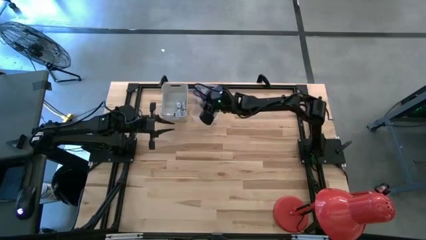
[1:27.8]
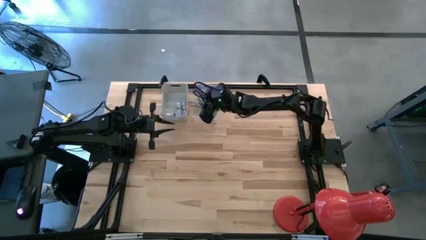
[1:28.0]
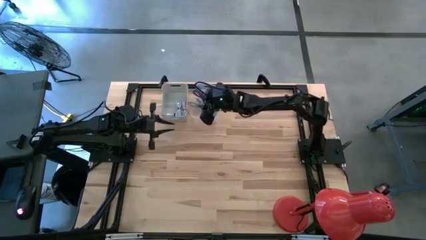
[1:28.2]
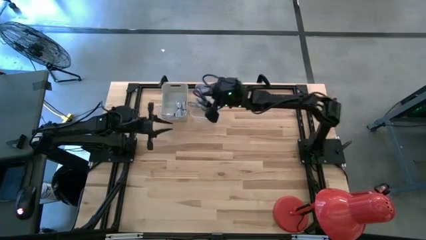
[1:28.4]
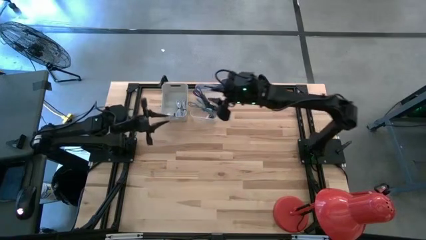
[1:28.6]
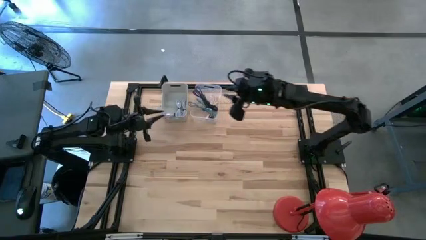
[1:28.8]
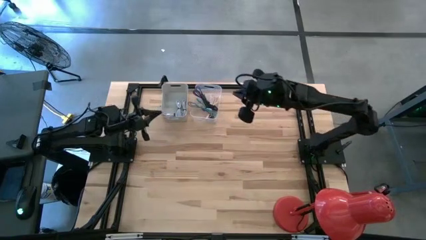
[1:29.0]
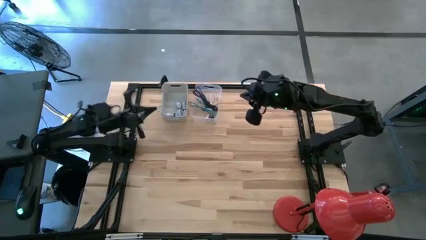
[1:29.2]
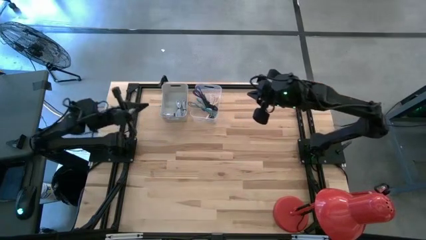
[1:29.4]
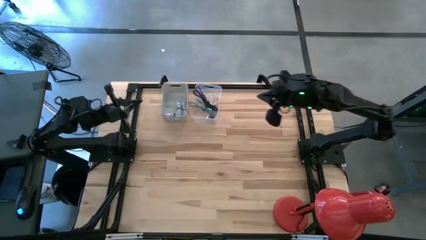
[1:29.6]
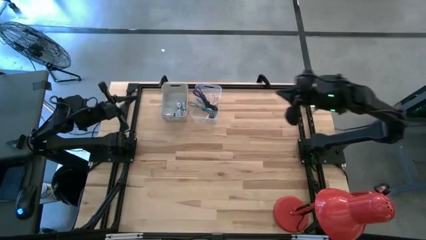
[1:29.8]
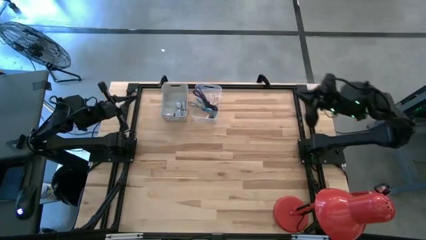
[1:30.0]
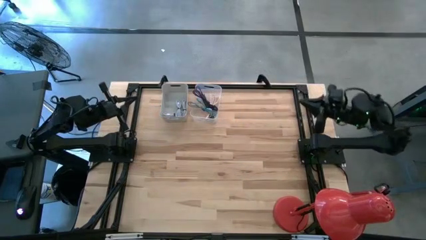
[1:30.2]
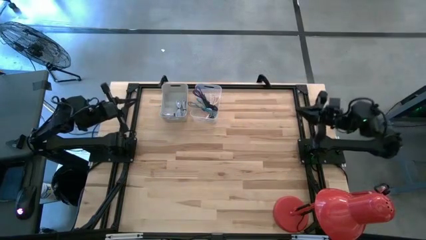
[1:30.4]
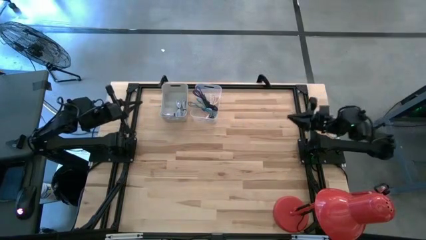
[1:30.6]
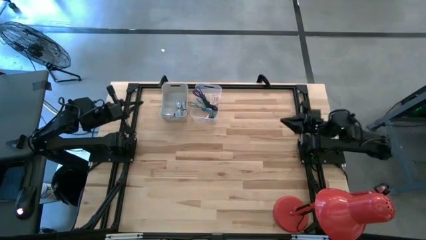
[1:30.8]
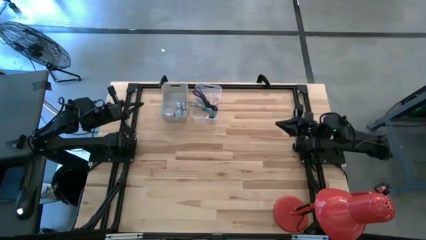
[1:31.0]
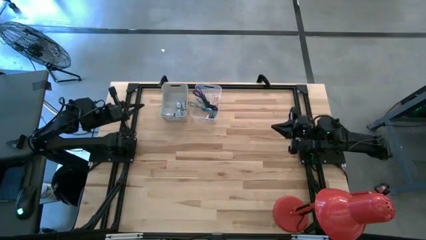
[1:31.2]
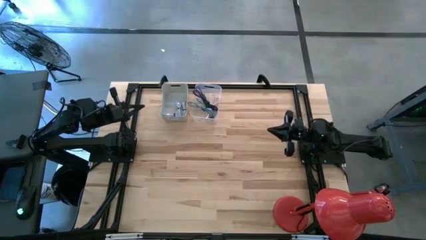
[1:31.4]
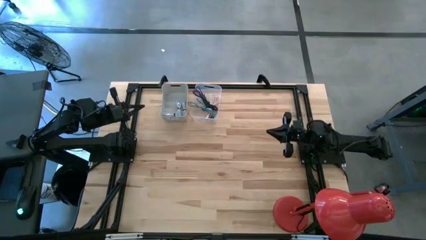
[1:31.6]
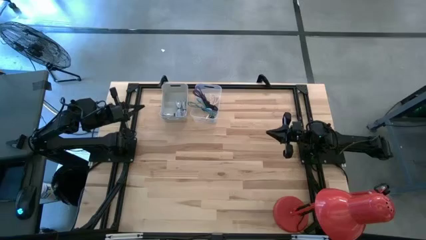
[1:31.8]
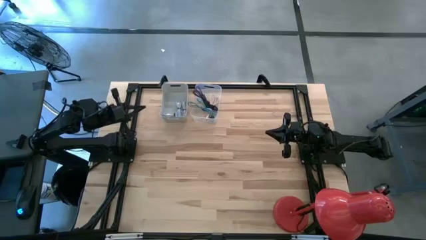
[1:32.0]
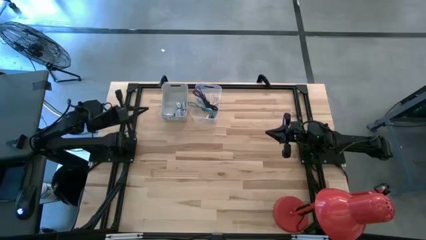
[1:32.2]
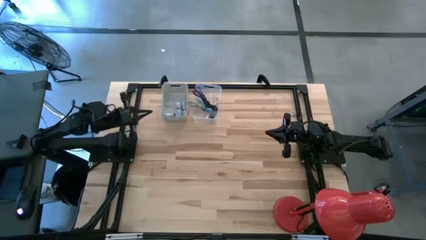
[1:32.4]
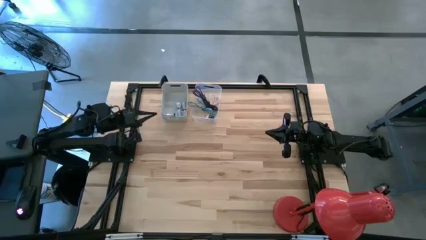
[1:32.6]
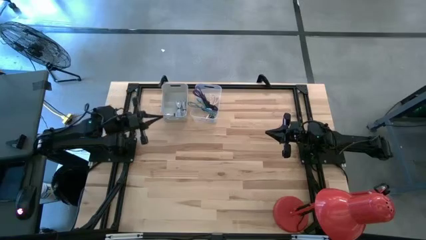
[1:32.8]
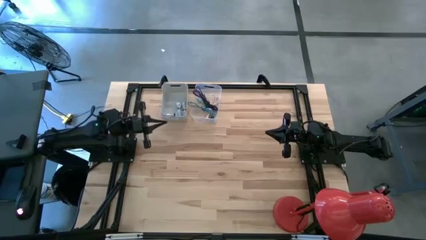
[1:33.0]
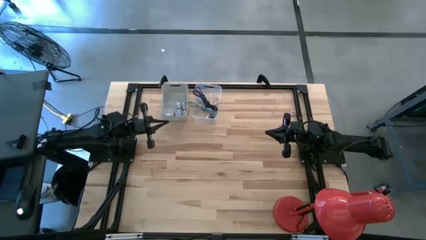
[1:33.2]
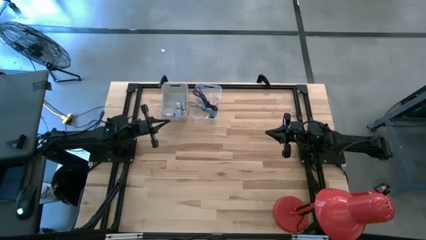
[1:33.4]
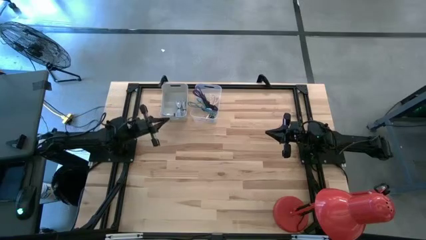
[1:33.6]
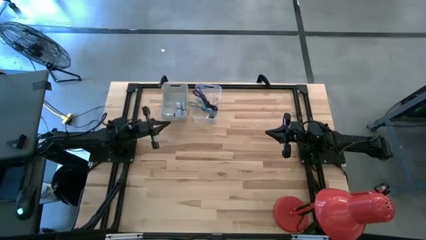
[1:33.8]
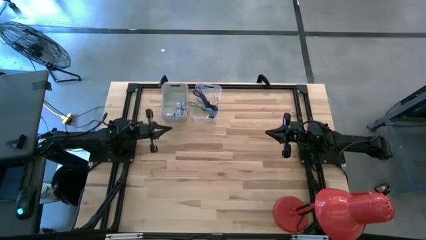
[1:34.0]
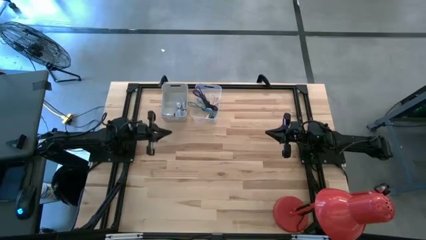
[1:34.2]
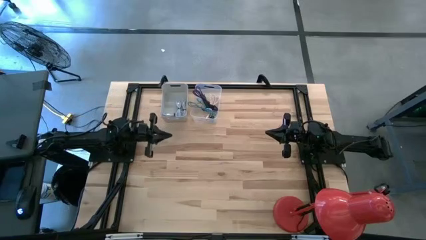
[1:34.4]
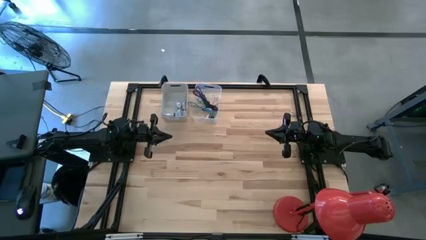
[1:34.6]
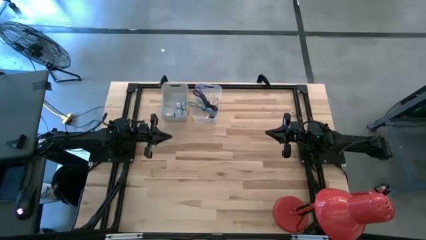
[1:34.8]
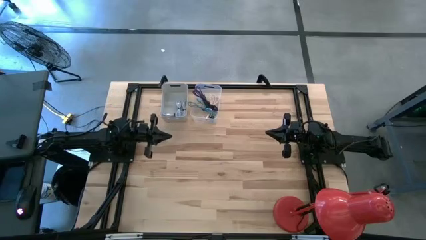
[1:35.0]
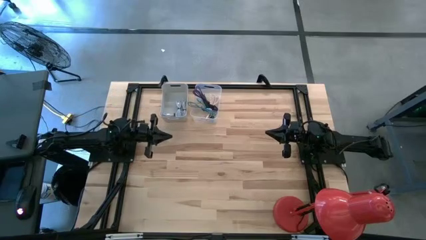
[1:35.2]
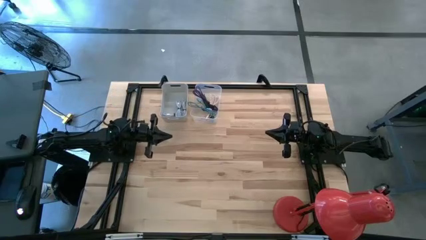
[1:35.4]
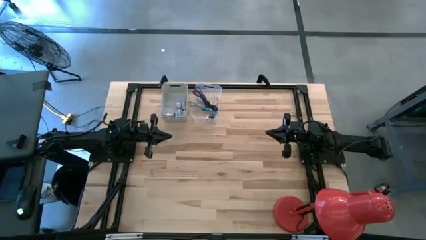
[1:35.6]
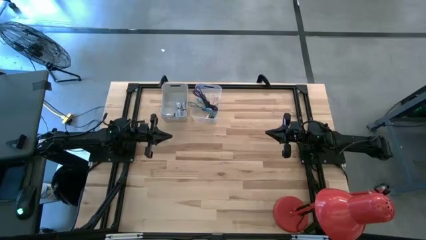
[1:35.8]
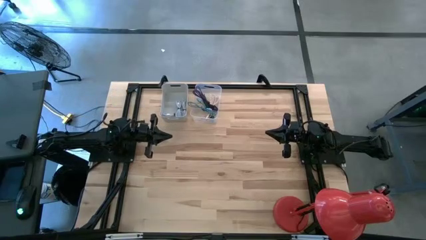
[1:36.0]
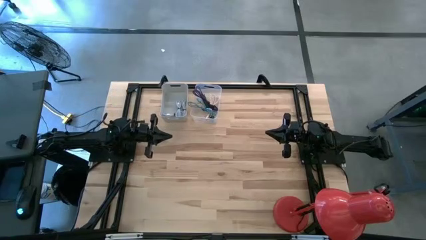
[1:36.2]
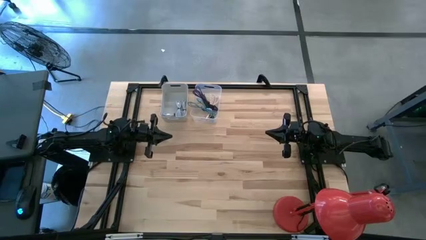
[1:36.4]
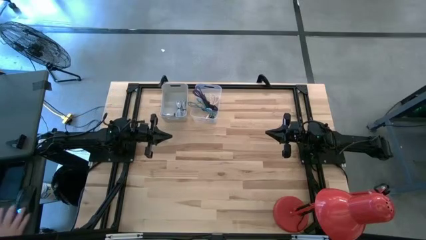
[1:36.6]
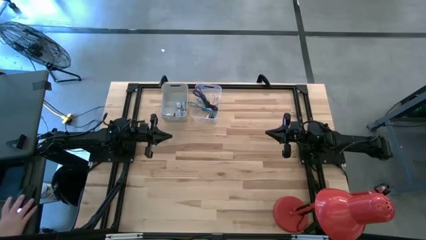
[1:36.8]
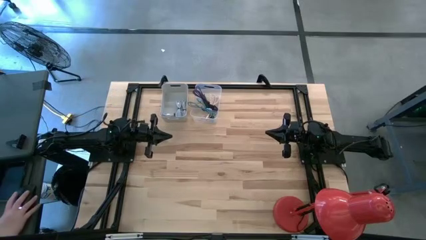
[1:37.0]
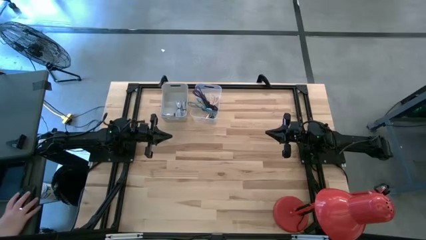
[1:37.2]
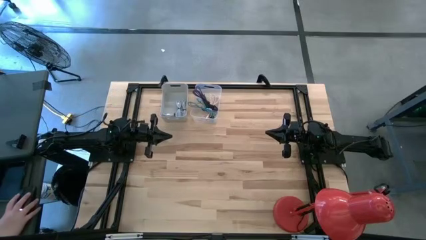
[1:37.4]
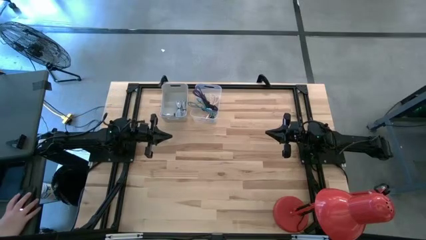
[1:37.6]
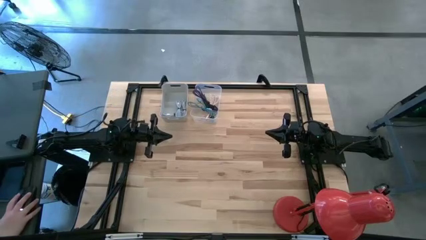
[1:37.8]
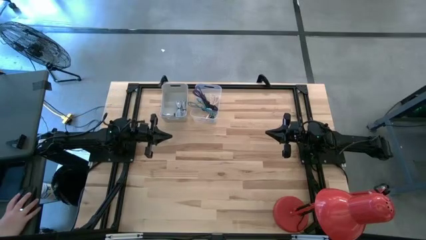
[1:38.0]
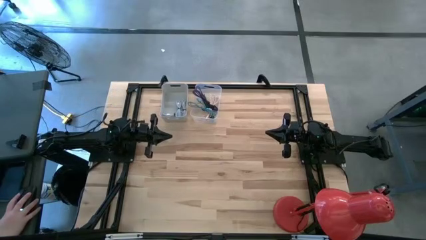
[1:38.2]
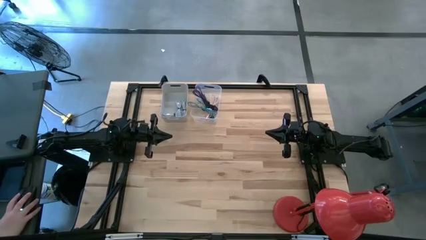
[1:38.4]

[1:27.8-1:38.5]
Task: Pick & Place USB Port
Return to Home Position

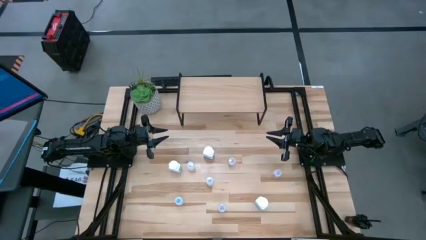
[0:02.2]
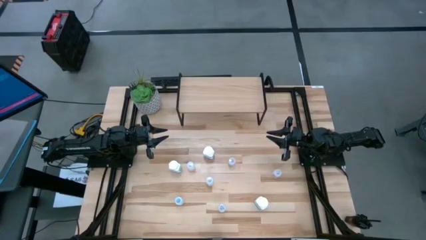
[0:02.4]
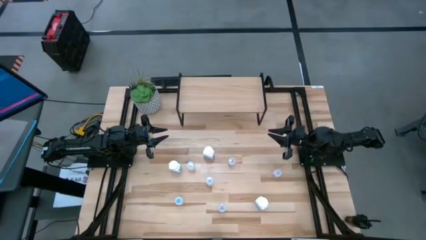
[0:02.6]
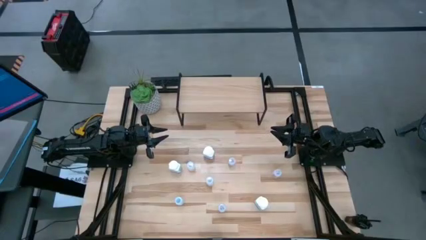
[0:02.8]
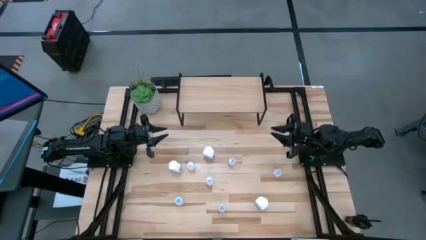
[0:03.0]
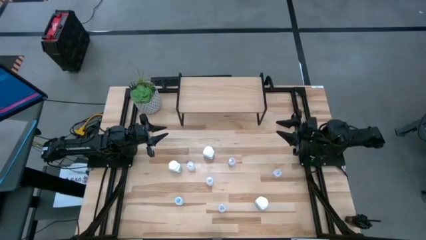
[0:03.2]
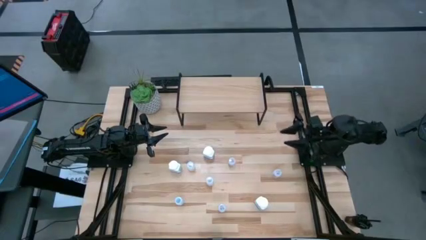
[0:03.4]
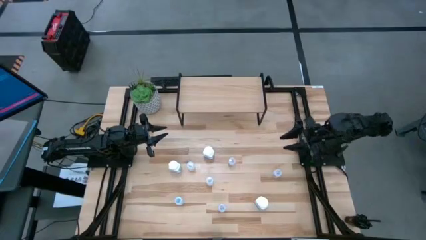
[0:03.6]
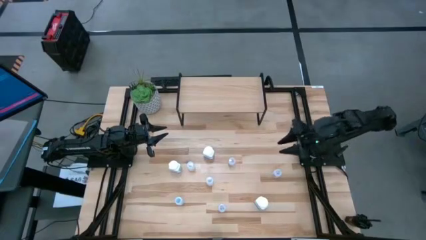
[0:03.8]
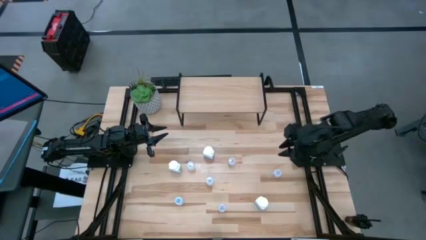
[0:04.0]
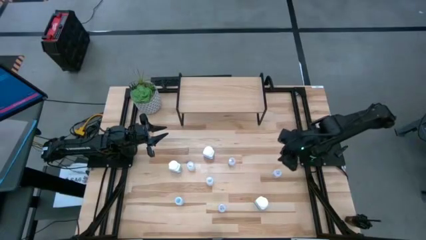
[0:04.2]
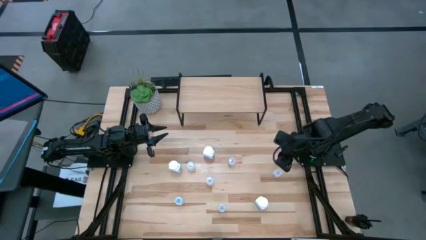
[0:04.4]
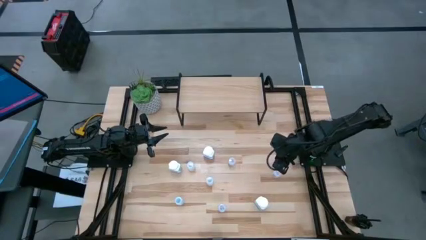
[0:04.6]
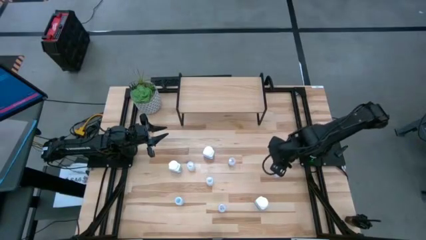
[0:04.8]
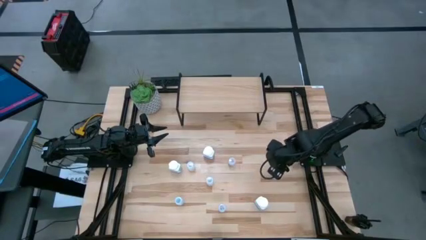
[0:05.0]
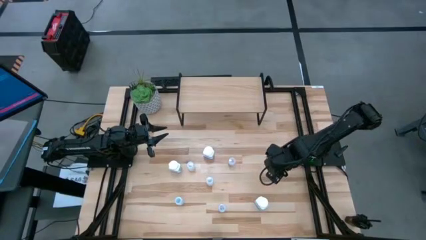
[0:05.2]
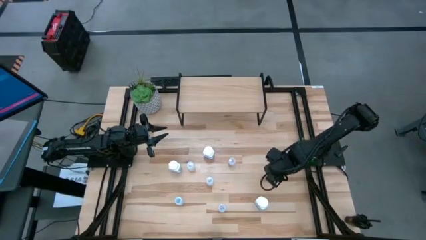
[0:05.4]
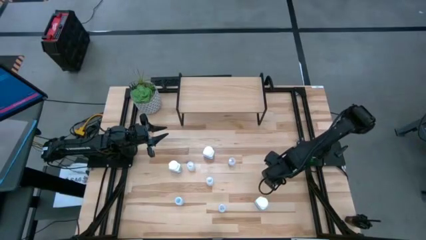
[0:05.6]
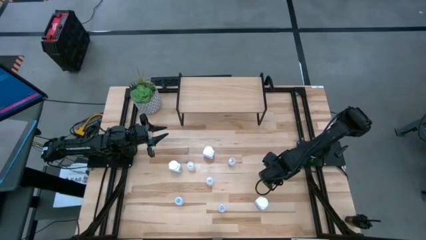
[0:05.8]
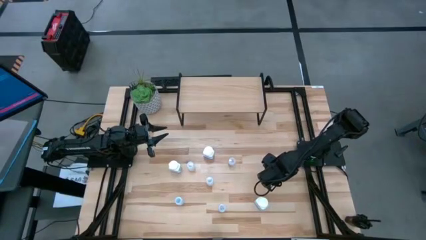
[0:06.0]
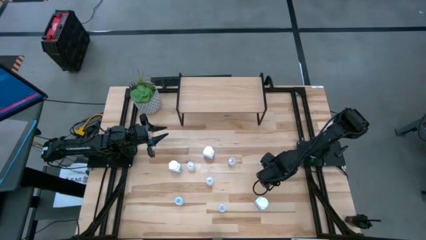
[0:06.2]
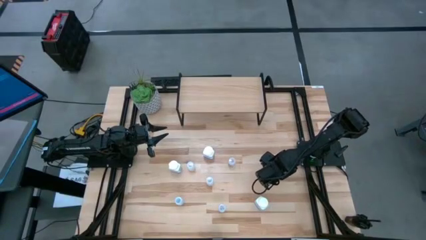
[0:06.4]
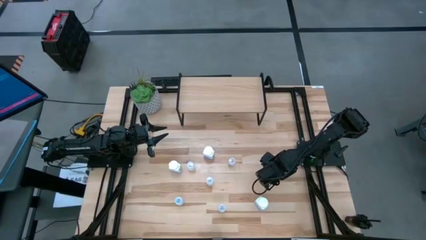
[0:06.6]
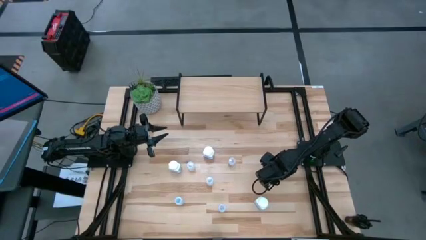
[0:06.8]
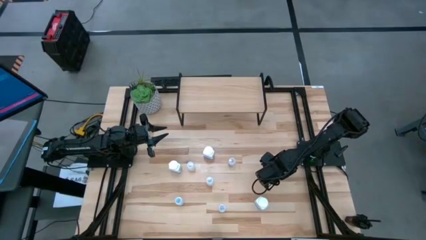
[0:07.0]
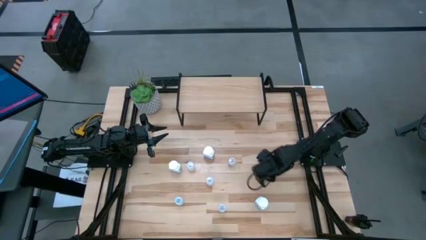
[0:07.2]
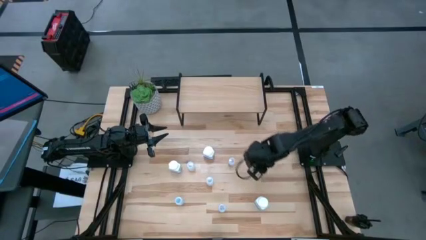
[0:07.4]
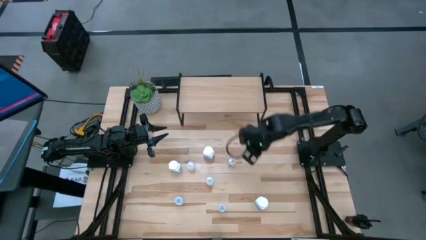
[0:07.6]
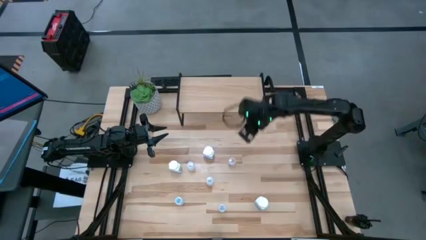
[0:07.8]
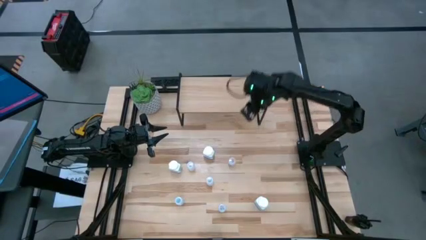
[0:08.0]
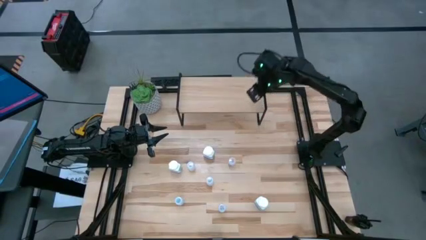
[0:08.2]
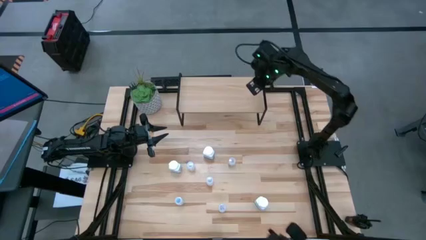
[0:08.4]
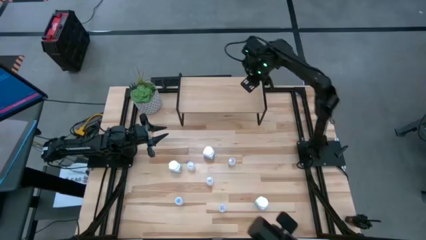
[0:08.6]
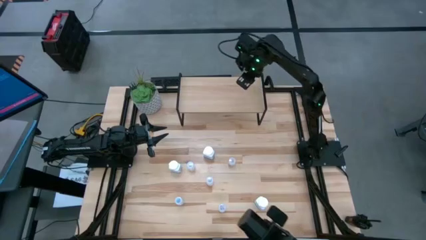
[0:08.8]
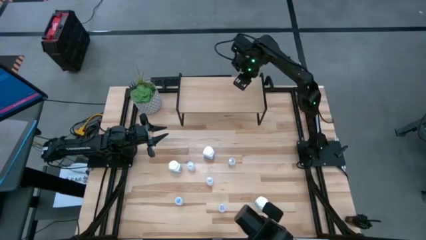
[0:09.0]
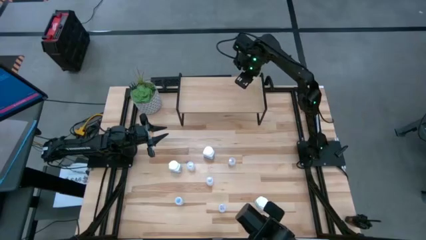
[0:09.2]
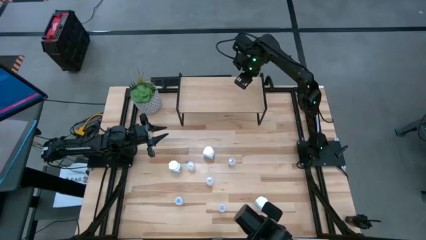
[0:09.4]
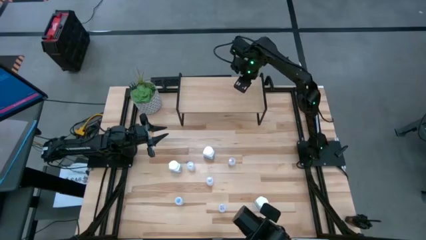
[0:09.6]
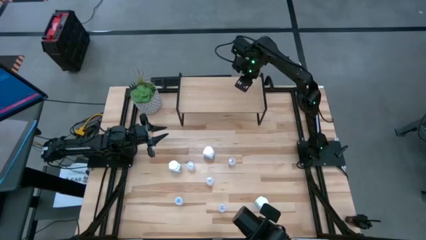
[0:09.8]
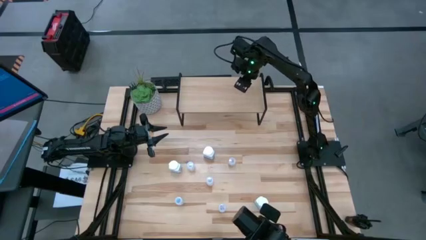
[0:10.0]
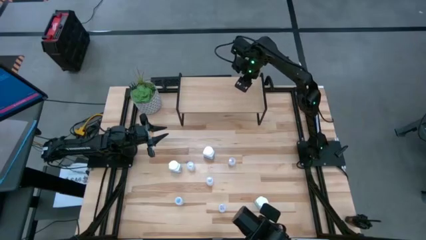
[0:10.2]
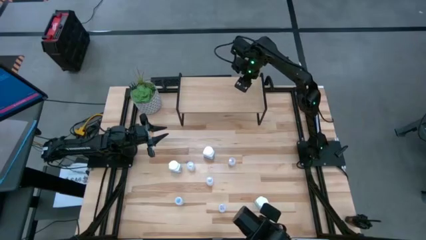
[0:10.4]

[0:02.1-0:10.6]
Task: Pick and place medicine bottles onto shelf by color
Put the middle transparent pill bottle on the shelf
